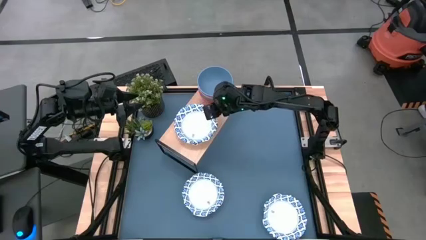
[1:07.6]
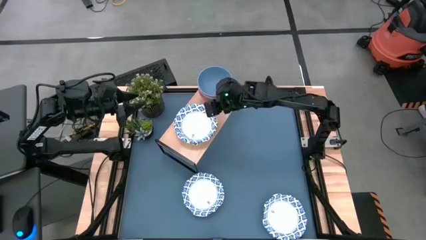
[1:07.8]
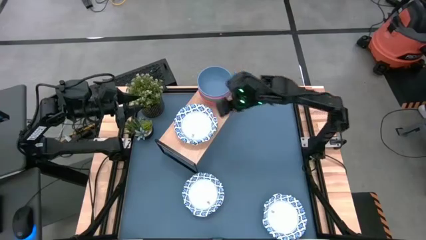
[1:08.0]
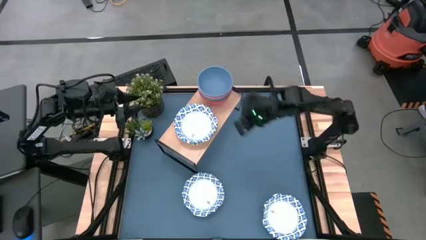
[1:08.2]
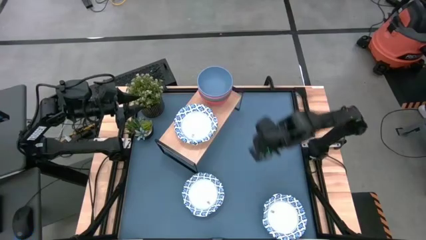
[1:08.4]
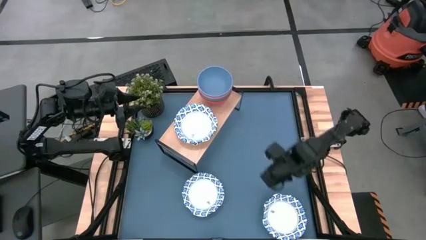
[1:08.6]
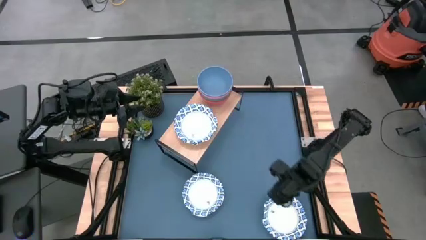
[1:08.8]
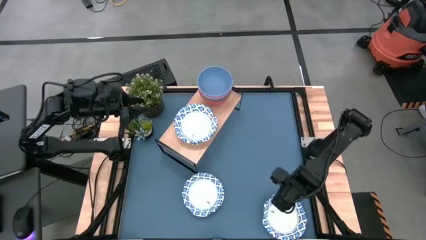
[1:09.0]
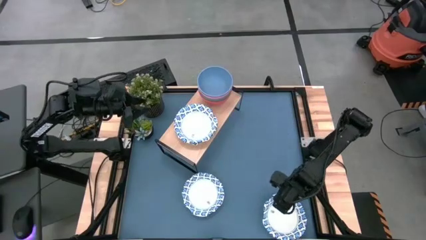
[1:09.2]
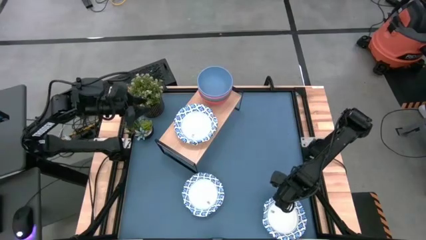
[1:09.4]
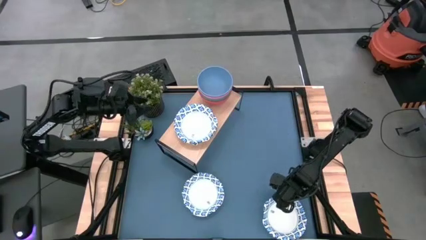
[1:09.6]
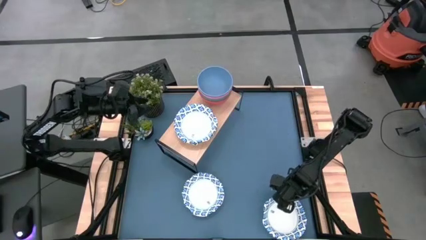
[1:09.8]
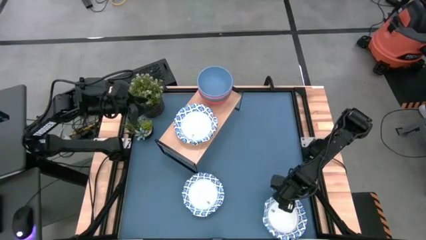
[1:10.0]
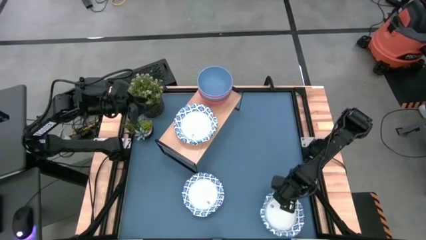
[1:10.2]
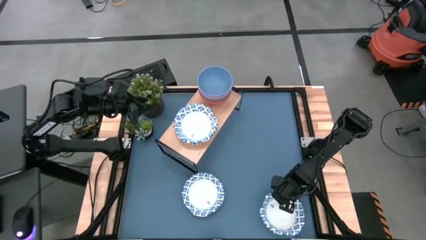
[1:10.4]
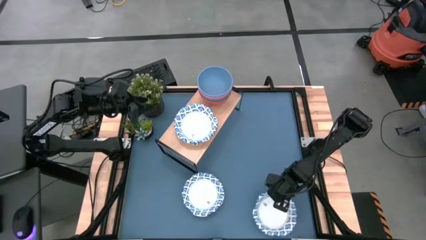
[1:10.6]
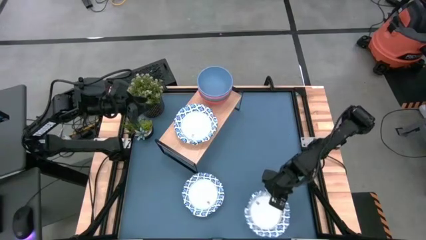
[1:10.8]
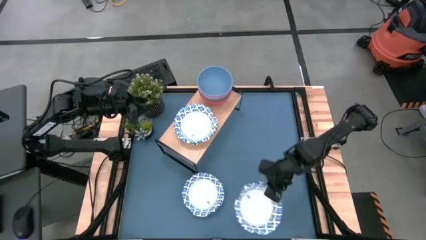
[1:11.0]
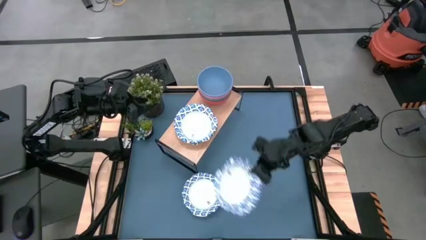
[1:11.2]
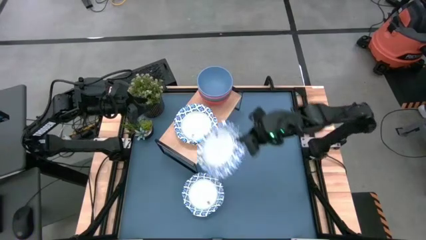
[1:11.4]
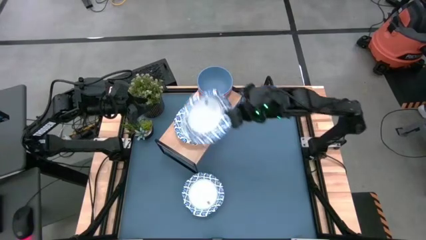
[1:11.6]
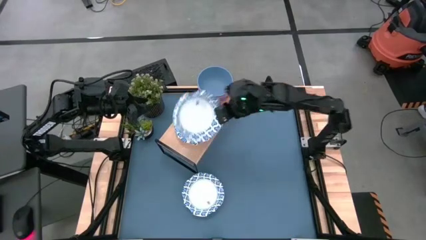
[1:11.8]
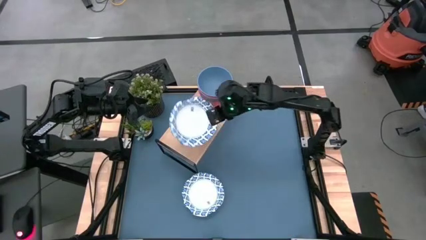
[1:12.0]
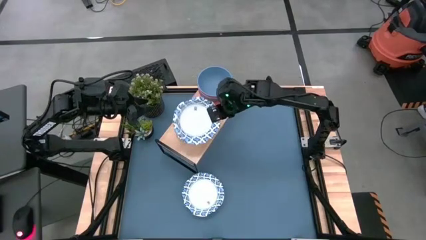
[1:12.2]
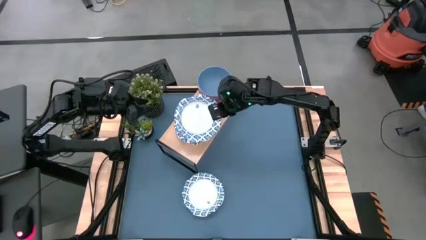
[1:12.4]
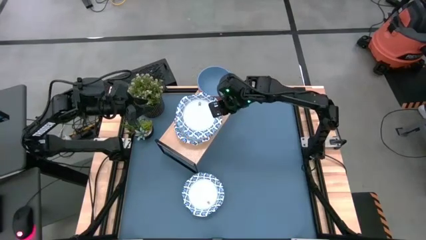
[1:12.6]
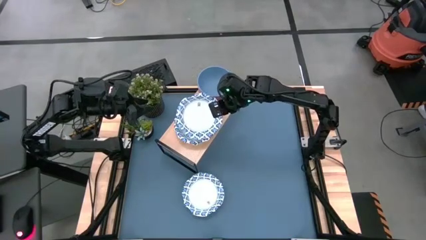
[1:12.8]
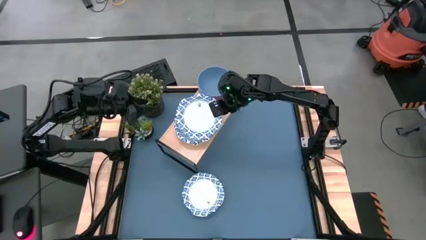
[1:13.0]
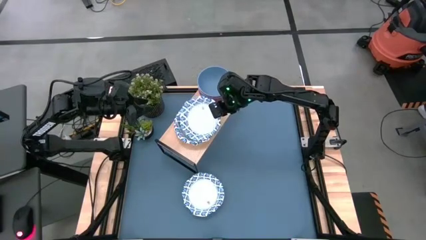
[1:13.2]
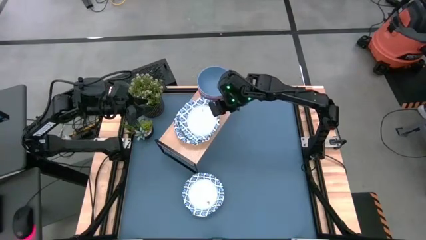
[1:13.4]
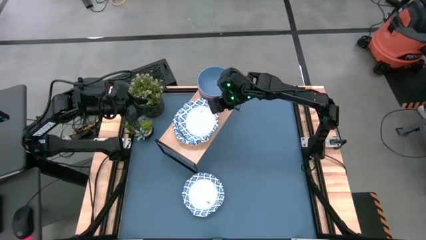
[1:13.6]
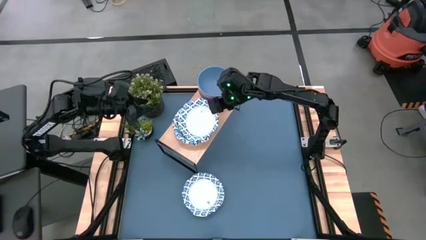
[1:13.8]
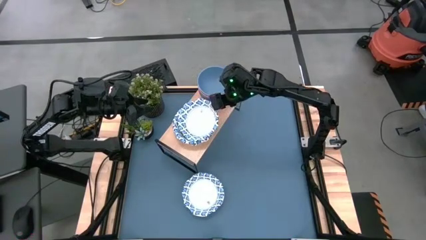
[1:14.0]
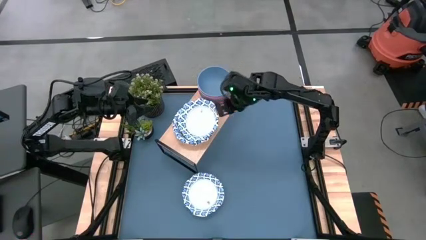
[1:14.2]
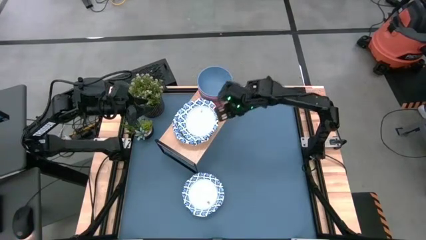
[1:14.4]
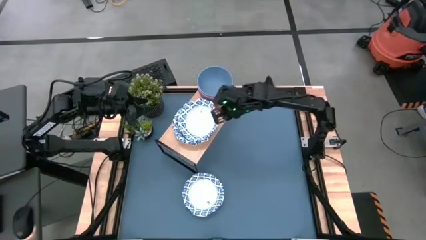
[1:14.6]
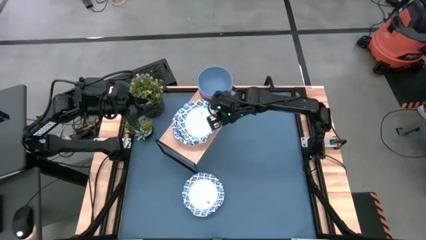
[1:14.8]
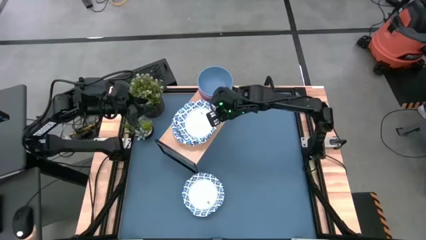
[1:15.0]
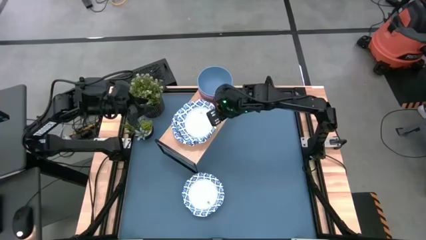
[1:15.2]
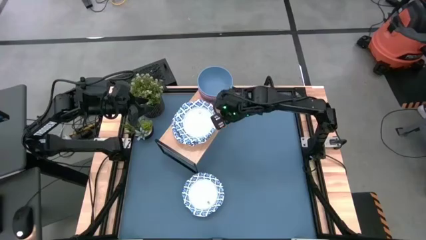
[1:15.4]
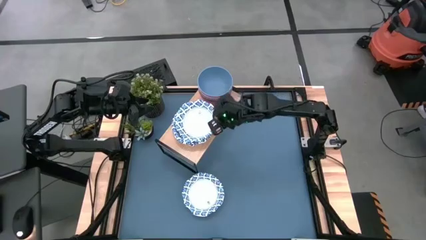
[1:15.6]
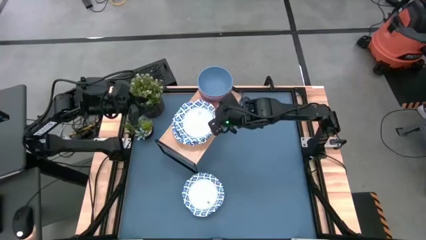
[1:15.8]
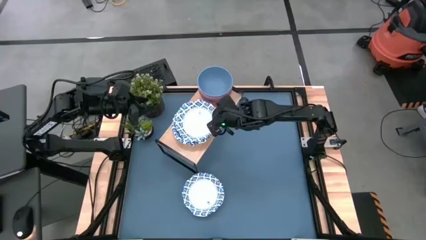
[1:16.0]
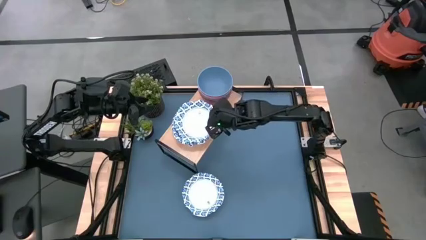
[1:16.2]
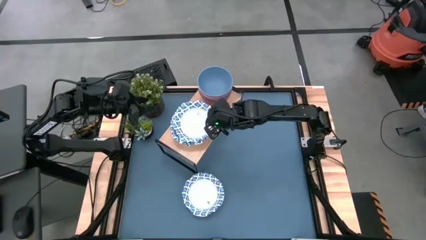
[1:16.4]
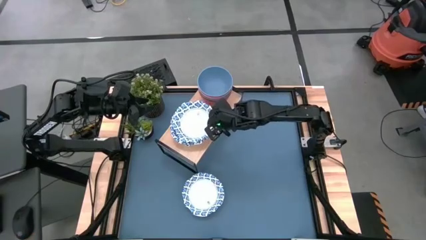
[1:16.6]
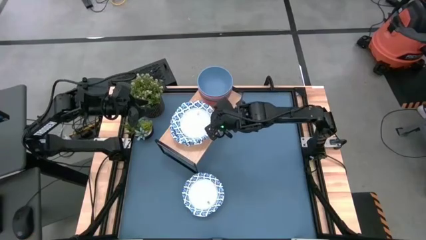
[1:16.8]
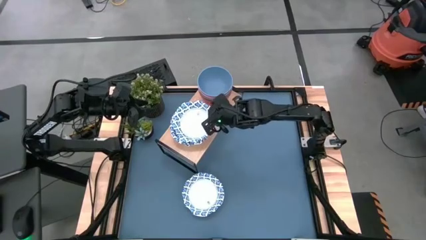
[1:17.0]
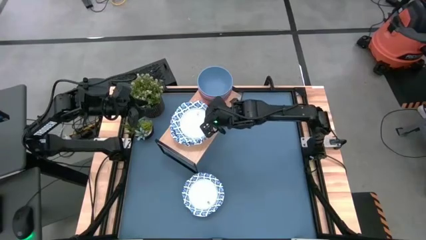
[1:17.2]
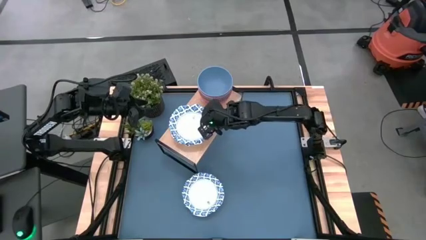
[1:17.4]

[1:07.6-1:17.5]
Task: Place and stack bowls onto a shelf
Stack the white bowl on top of the other white bowl on the shelf

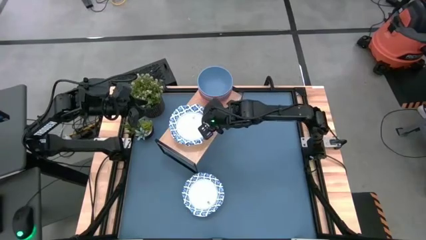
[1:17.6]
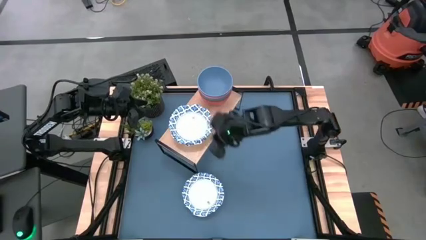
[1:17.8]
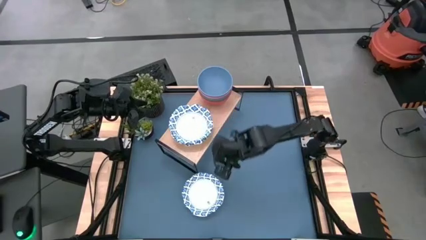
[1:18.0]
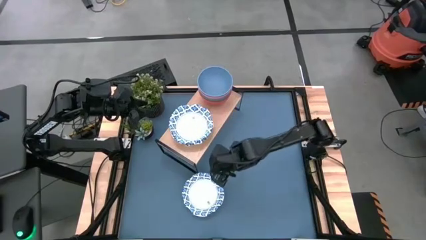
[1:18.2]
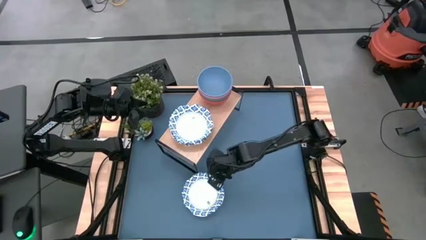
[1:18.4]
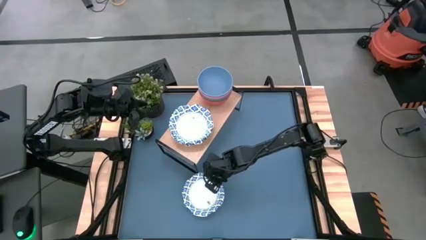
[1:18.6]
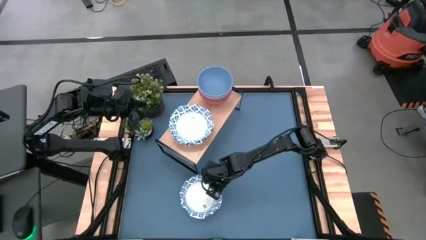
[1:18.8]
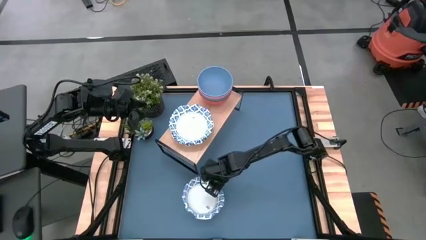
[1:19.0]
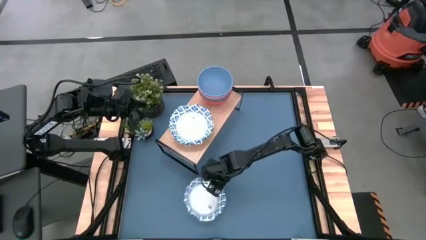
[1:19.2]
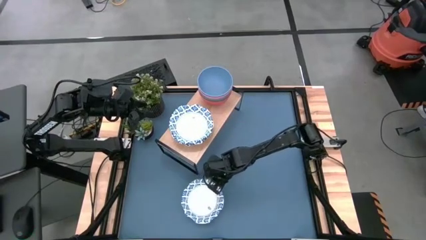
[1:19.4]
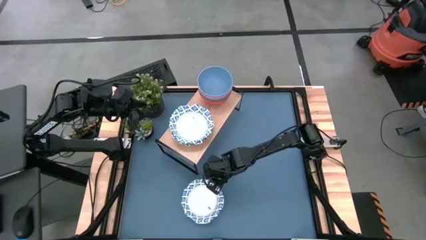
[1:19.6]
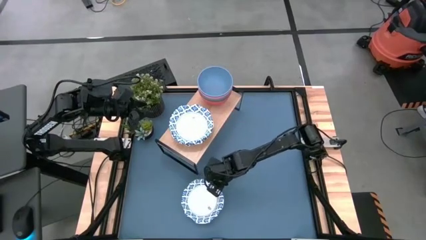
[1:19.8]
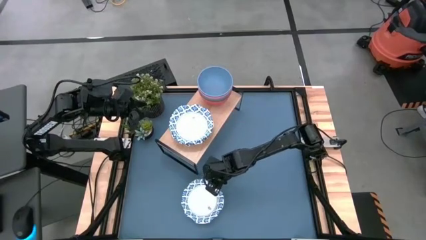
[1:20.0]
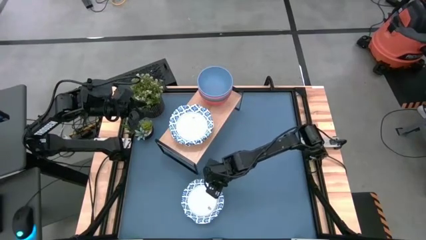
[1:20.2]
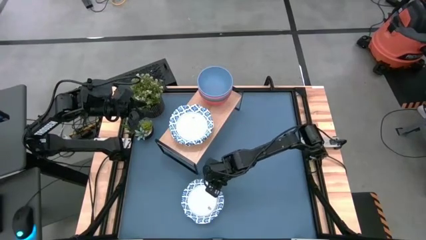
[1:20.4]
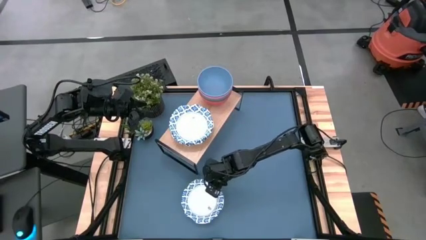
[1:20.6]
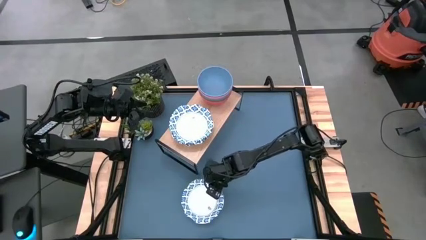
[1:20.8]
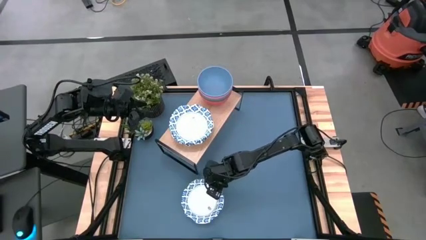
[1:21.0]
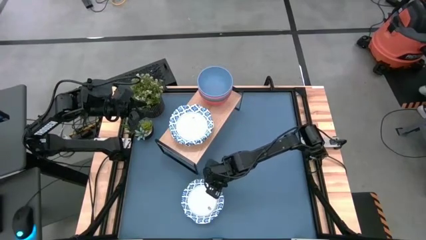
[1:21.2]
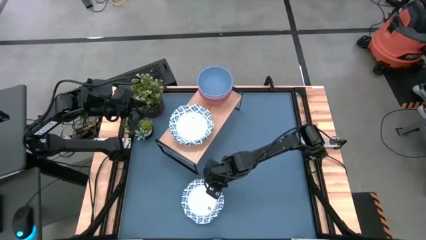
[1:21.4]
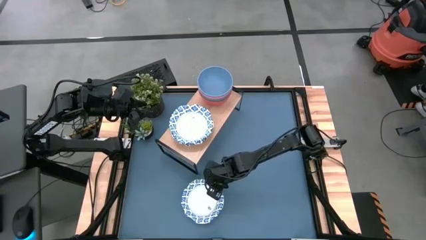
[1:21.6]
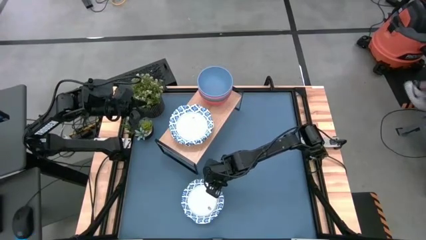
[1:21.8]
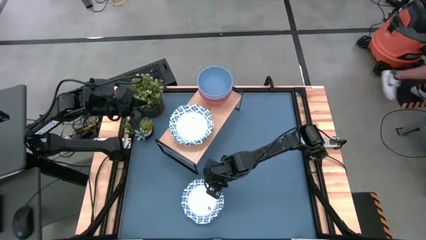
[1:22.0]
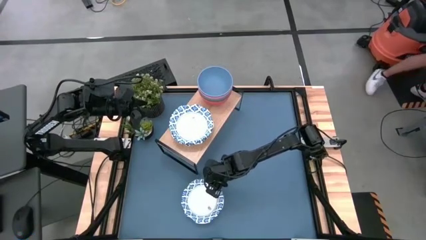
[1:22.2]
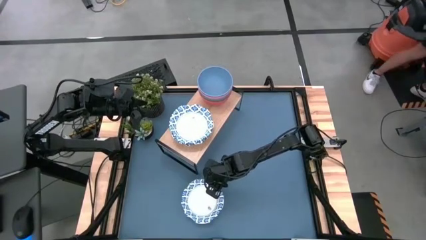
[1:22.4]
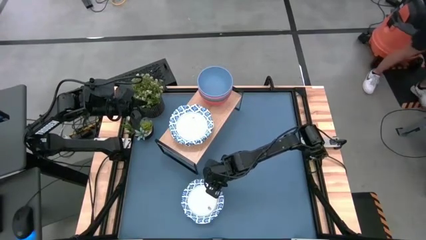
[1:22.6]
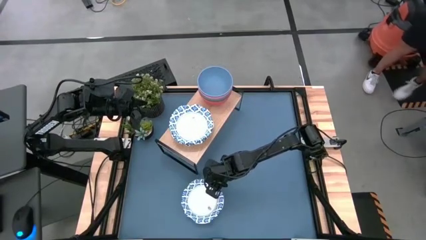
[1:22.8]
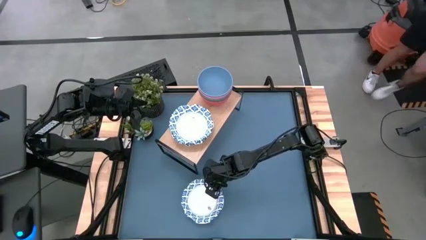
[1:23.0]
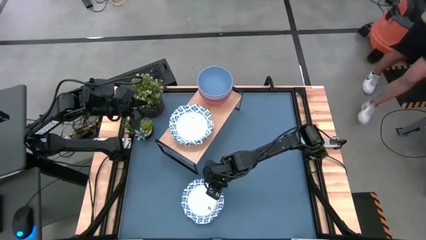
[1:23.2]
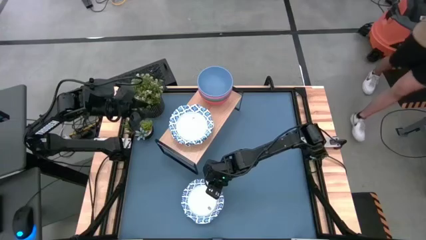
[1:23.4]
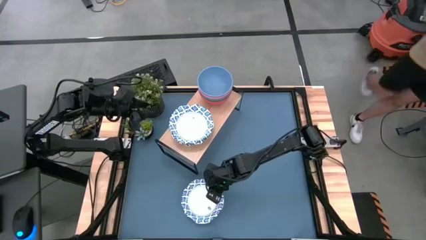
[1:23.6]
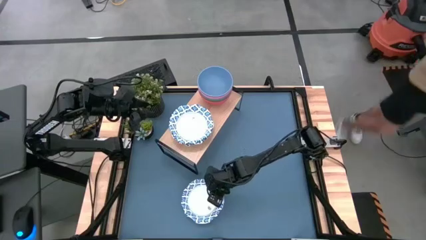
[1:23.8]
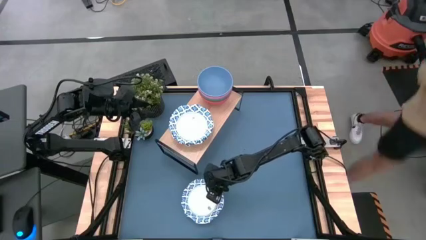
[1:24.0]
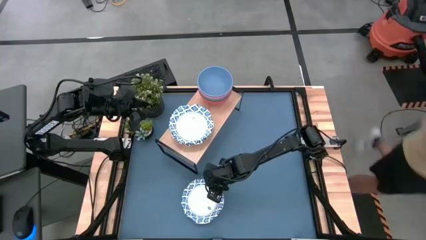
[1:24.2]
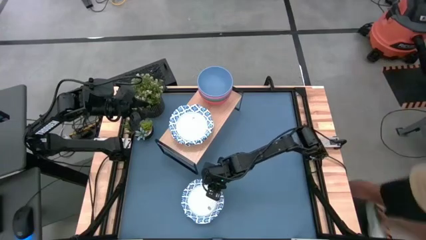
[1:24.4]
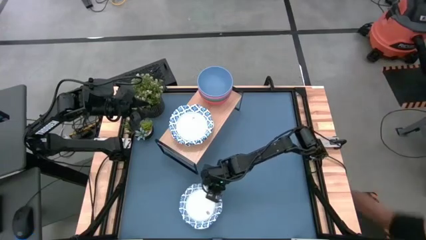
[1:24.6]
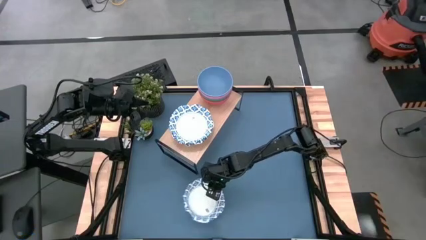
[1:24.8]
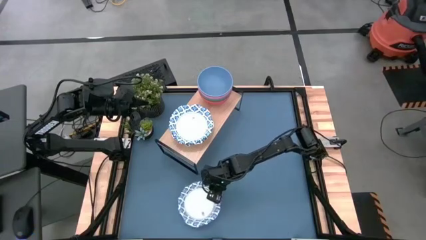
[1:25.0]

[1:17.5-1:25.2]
Stack the white bowl on top of the other white bowl on the shelf
